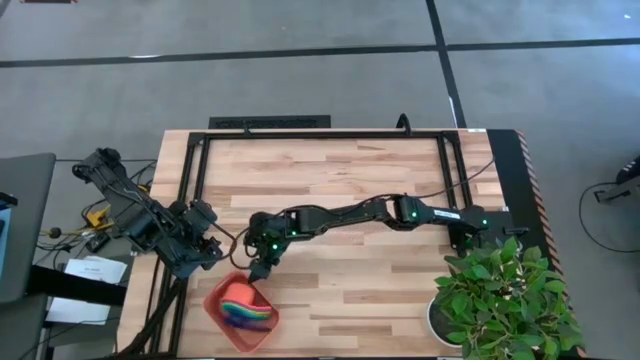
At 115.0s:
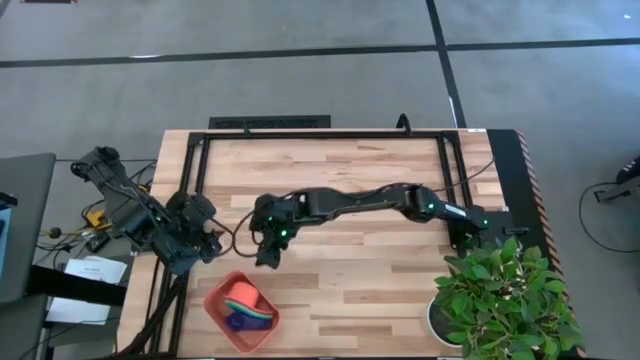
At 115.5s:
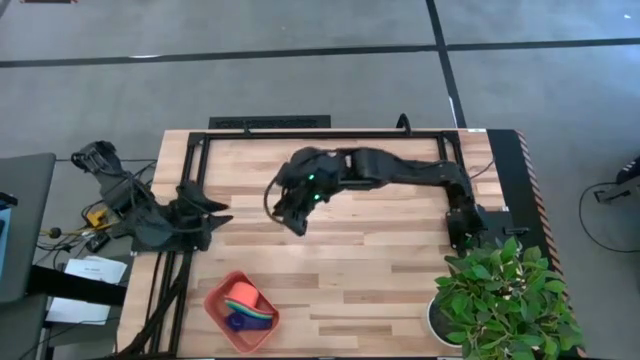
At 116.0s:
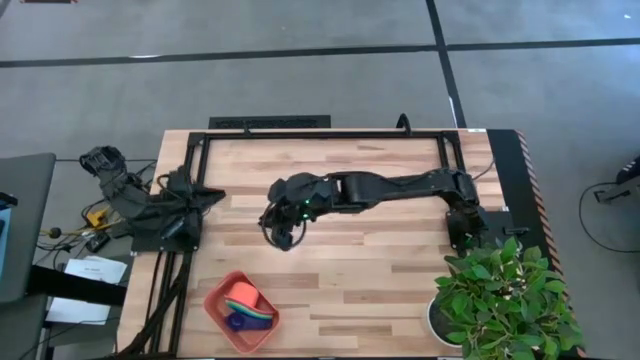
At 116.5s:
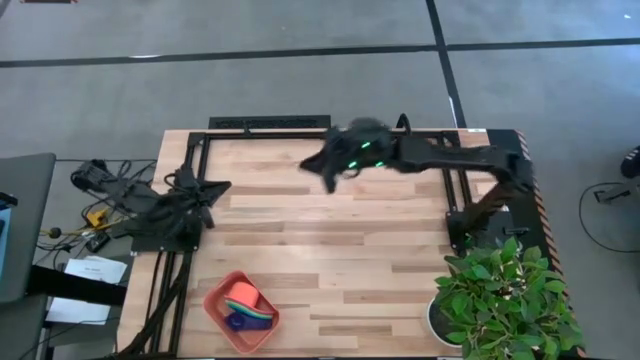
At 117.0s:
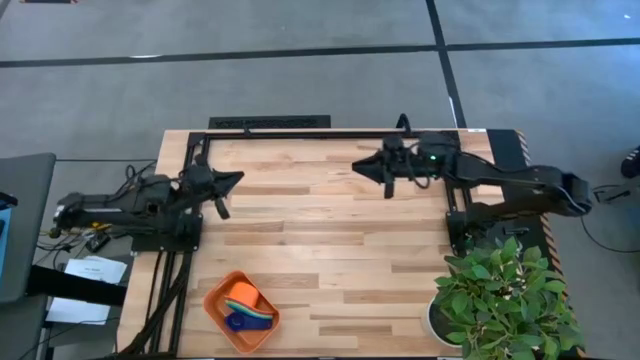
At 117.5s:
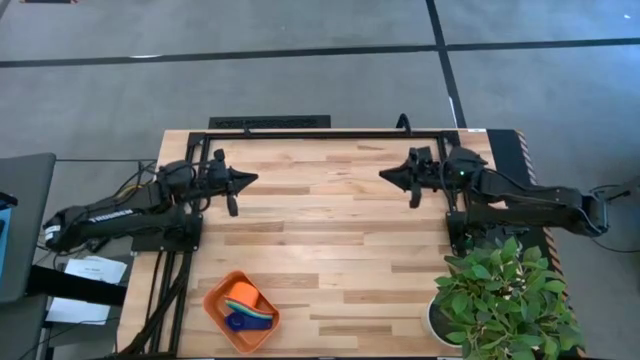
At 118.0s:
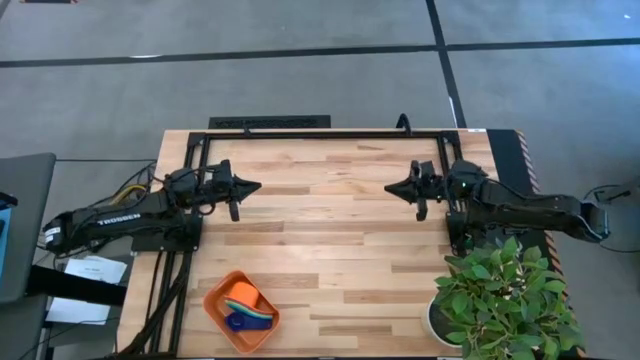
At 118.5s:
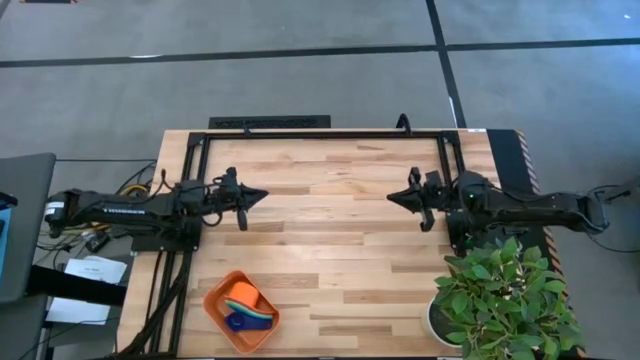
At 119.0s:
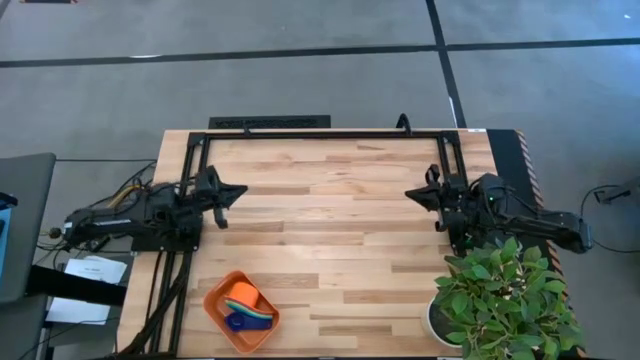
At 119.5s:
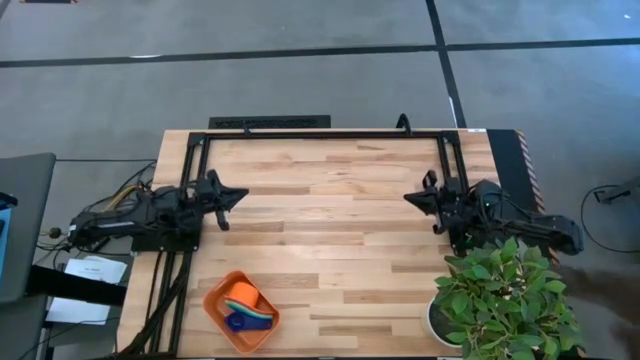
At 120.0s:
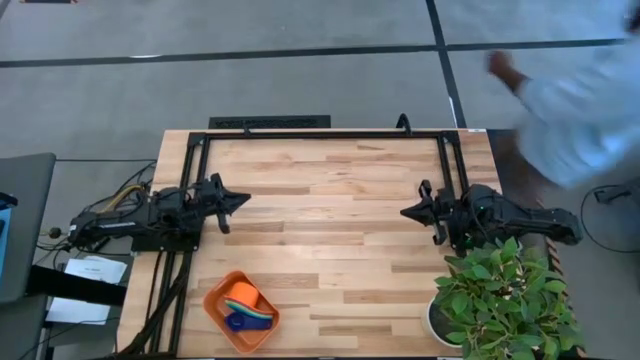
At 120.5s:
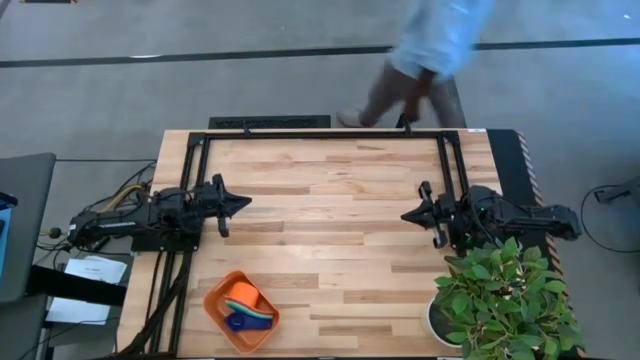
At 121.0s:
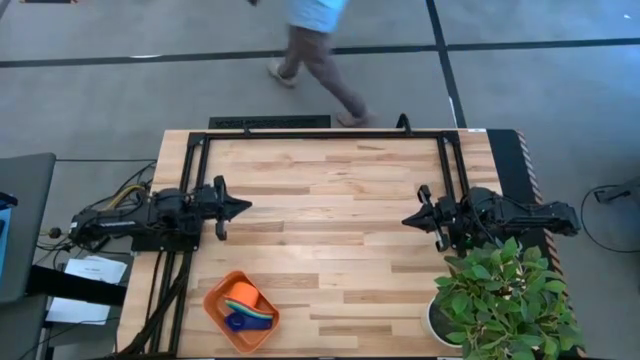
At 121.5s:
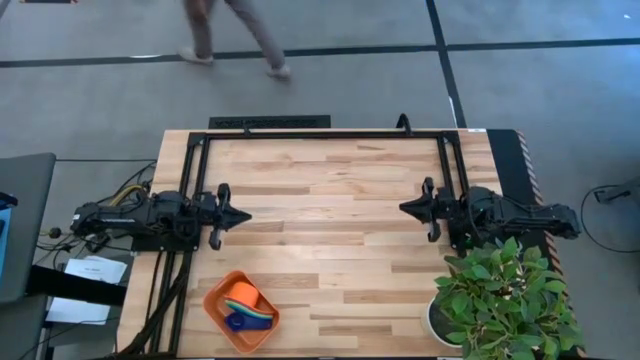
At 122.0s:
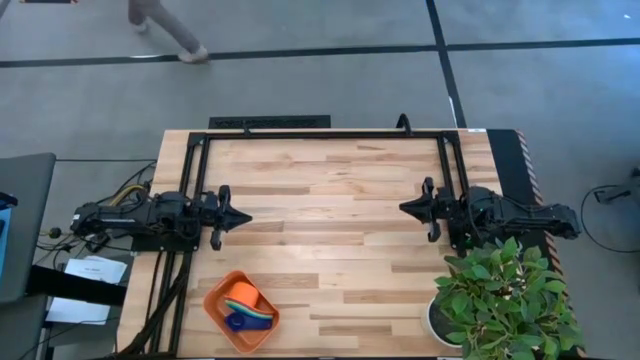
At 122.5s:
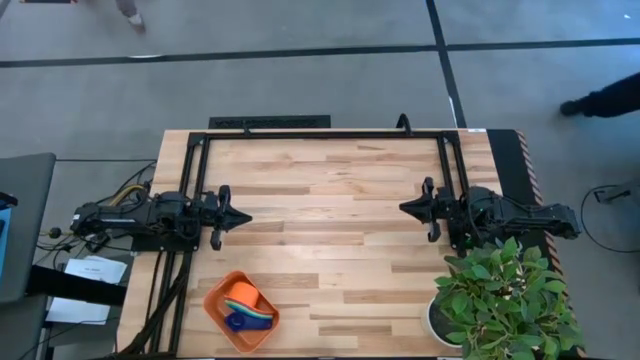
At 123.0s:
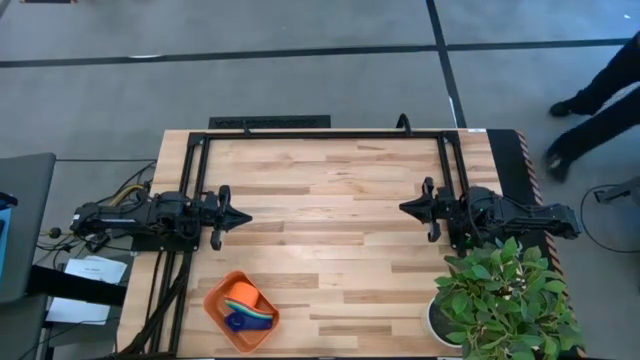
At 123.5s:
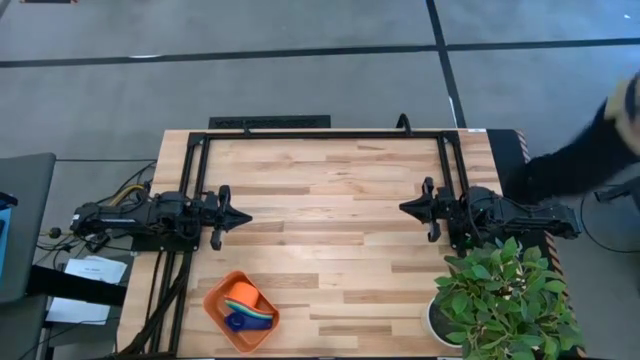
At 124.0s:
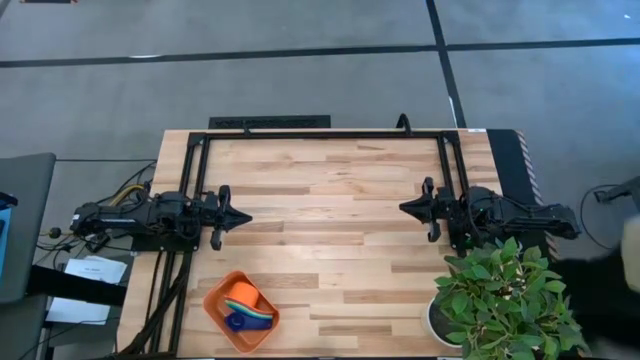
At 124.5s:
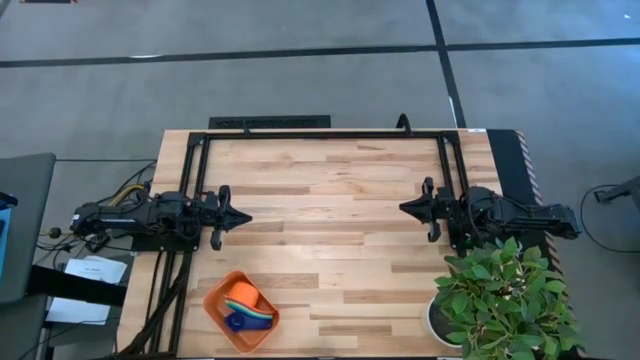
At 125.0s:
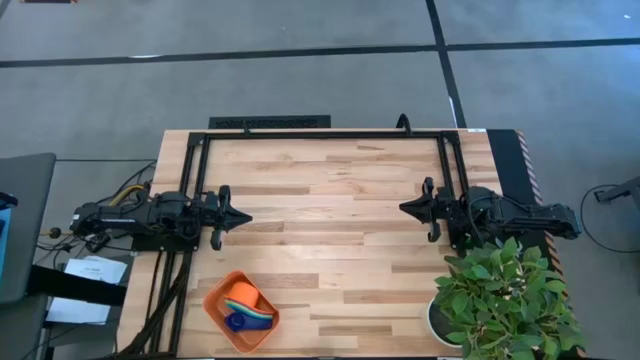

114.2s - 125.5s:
Task: Nest measuring cups in basket
Return to Home Position

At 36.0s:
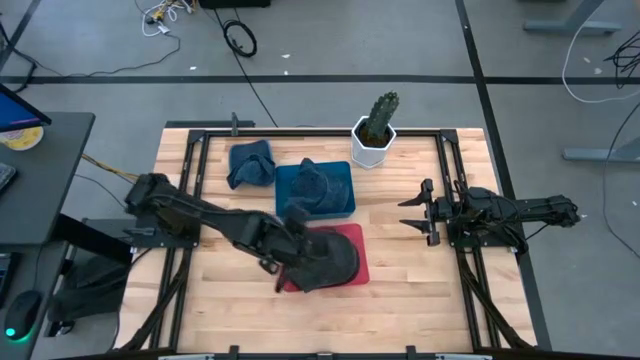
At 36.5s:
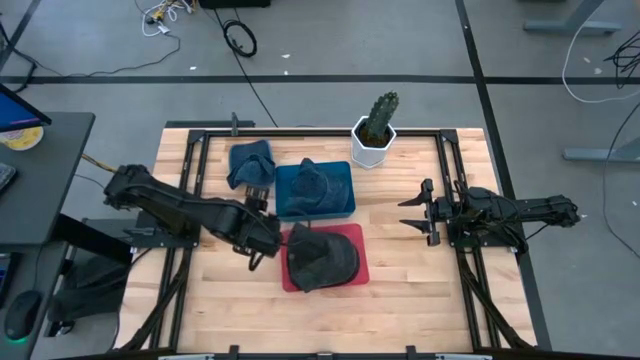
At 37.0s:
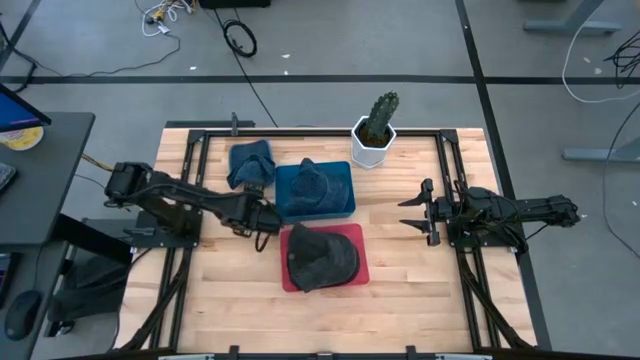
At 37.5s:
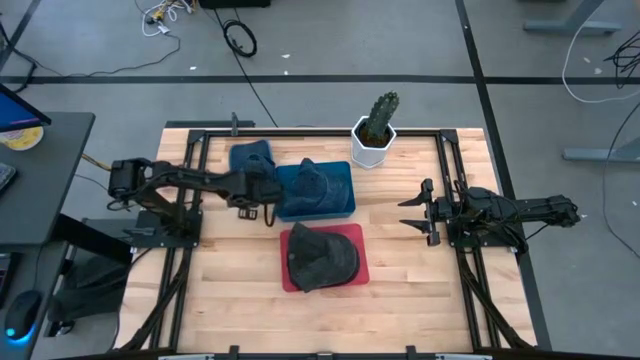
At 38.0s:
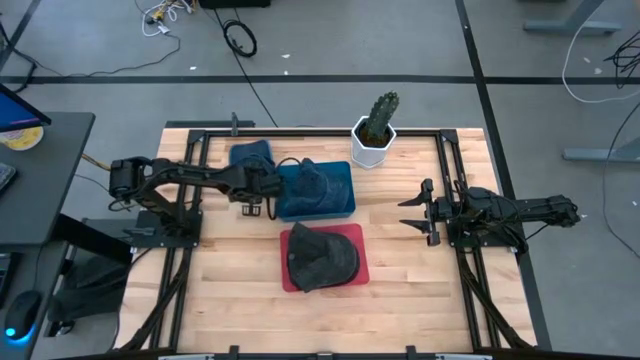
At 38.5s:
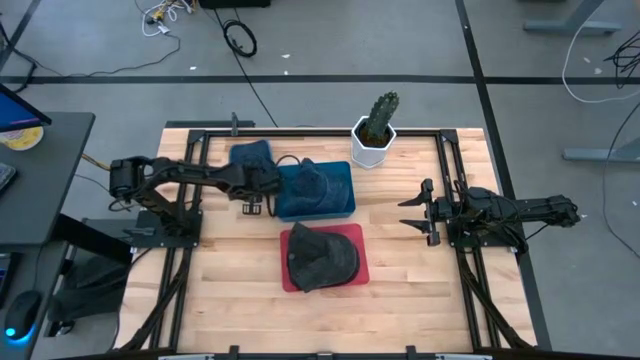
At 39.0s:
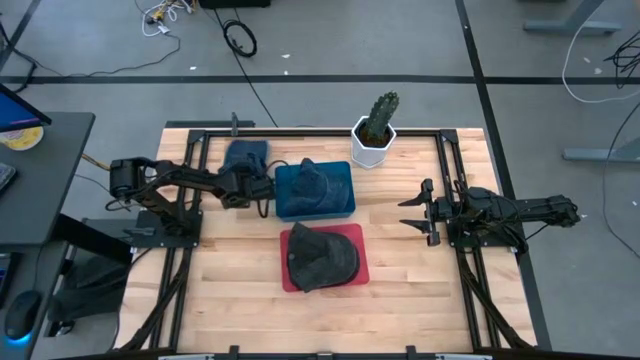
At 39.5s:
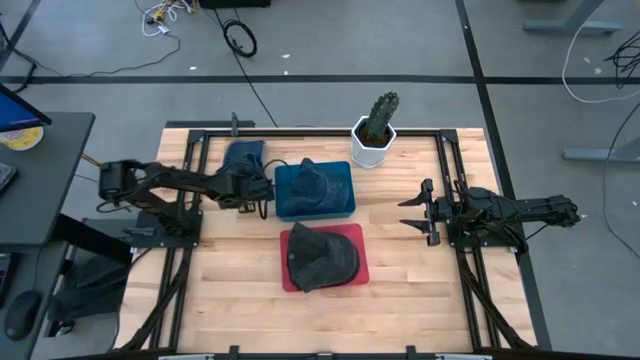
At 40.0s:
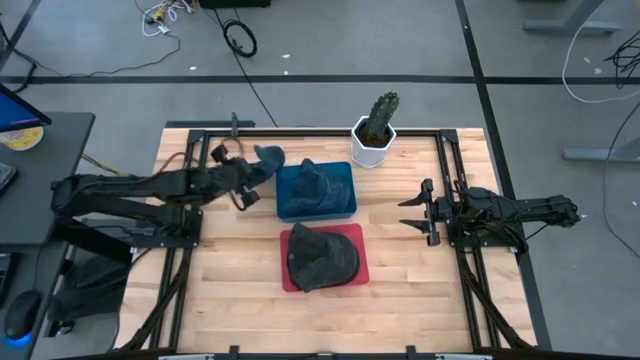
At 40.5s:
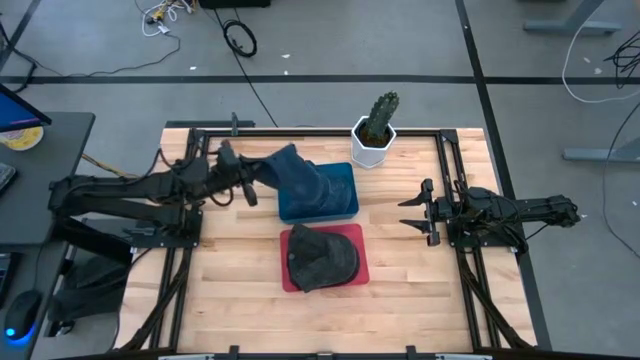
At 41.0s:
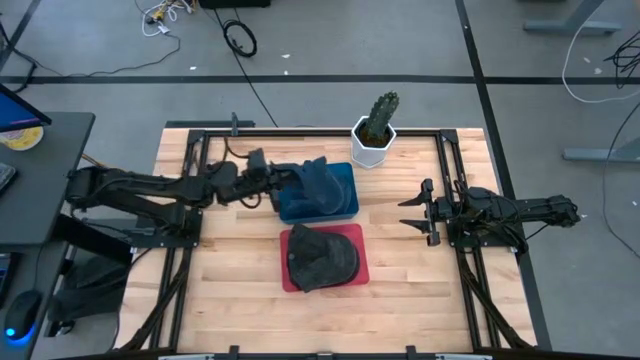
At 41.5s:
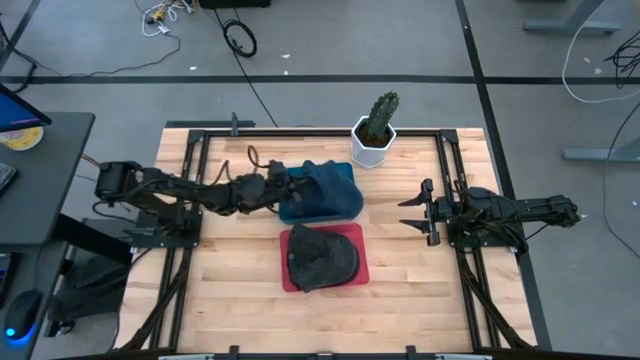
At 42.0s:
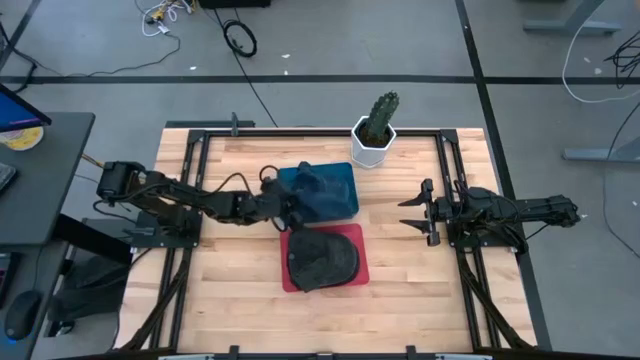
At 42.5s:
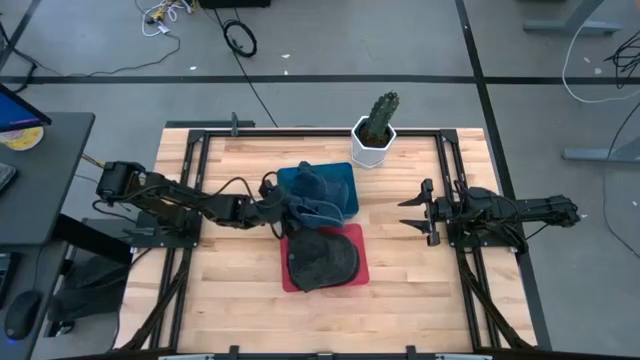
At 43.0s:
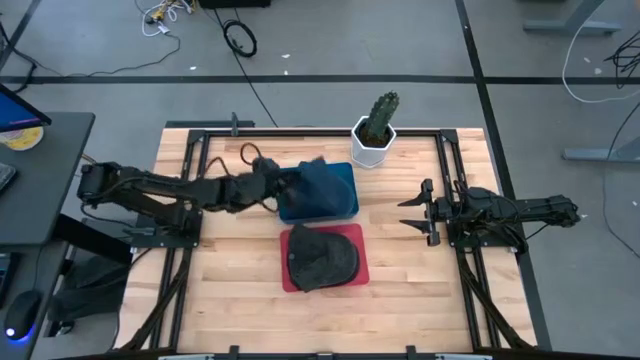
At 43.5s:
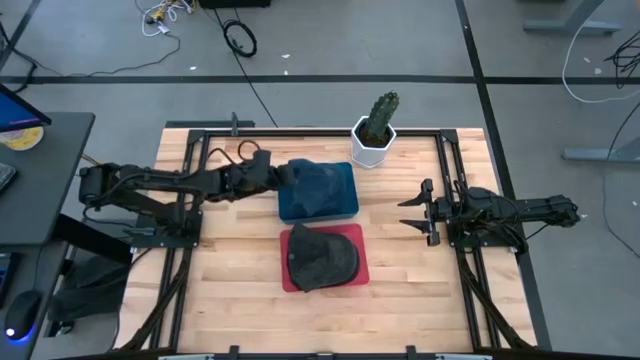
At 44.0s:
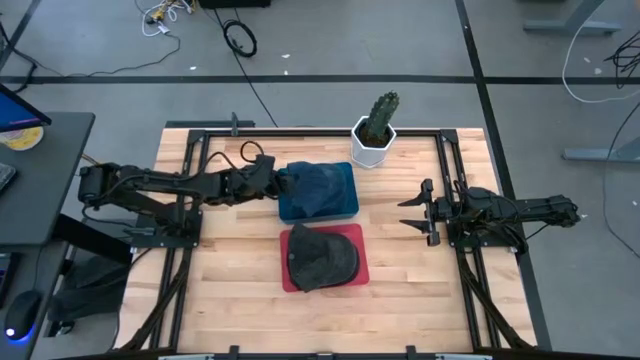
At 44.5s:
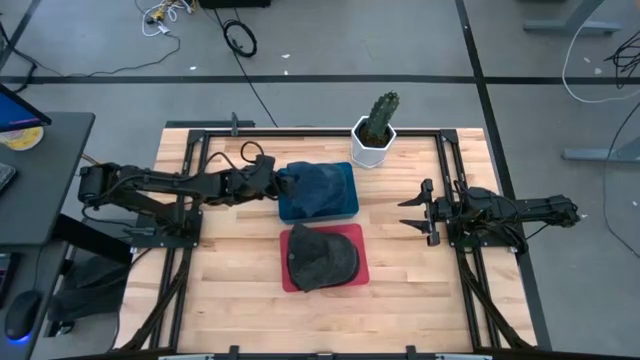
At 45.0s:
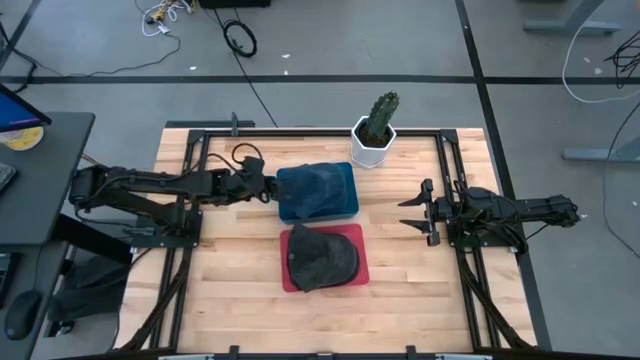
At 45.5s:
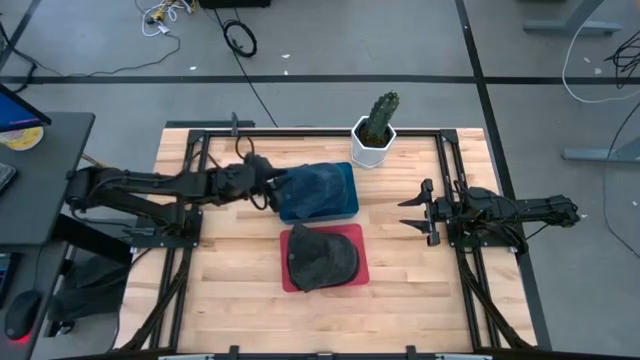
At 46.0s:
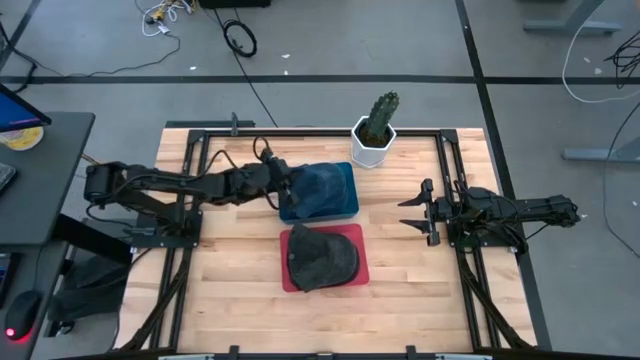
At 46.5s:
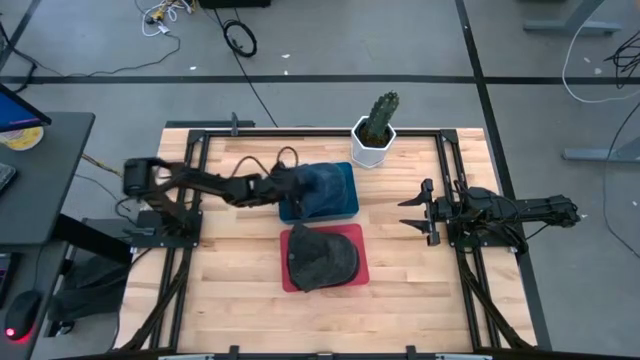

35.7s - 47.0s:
Task: Pick & Place hat
Put the blue cap into the blue bin
